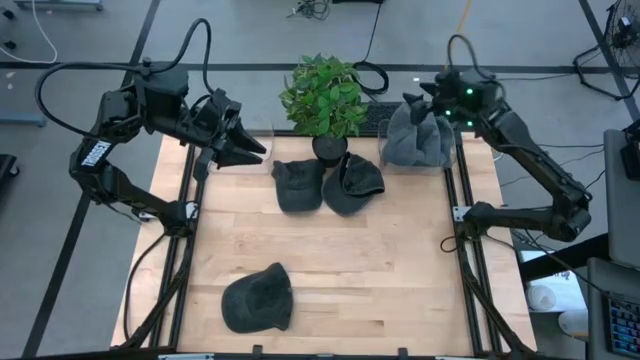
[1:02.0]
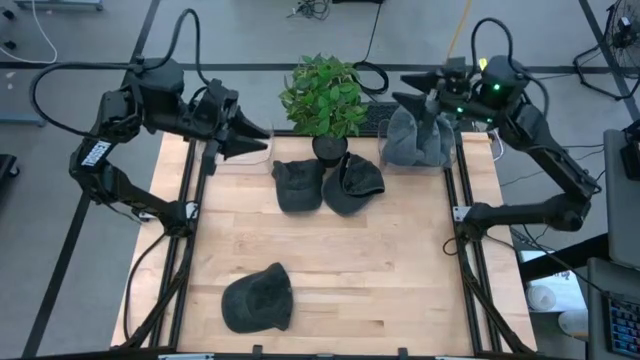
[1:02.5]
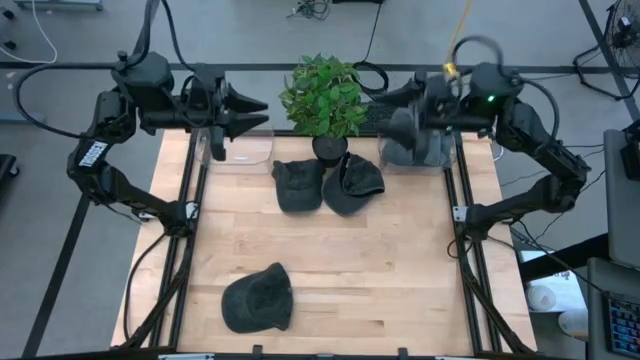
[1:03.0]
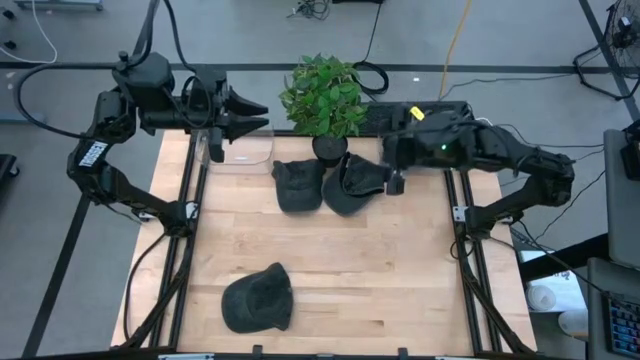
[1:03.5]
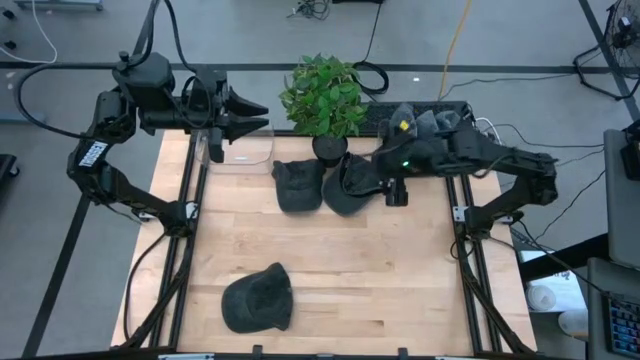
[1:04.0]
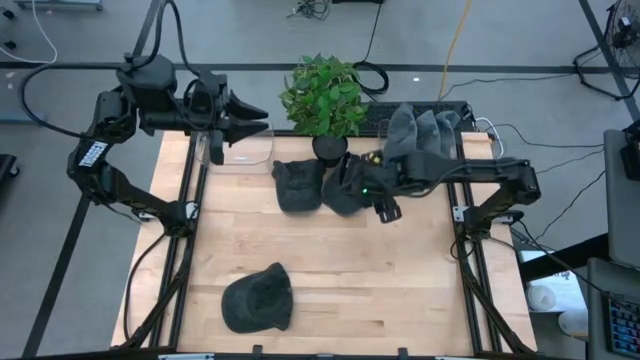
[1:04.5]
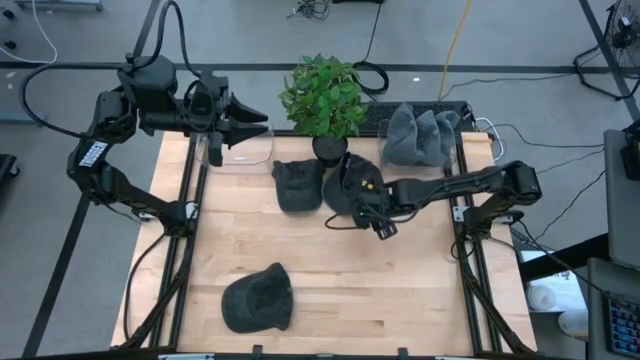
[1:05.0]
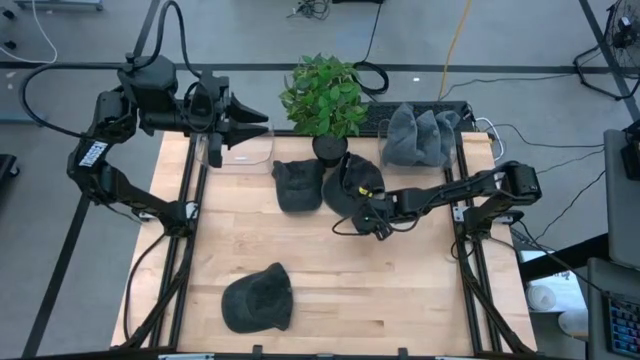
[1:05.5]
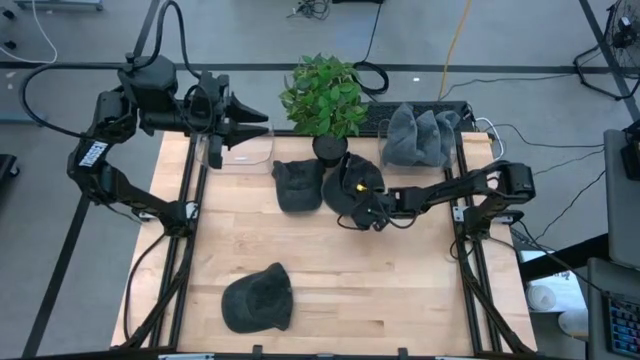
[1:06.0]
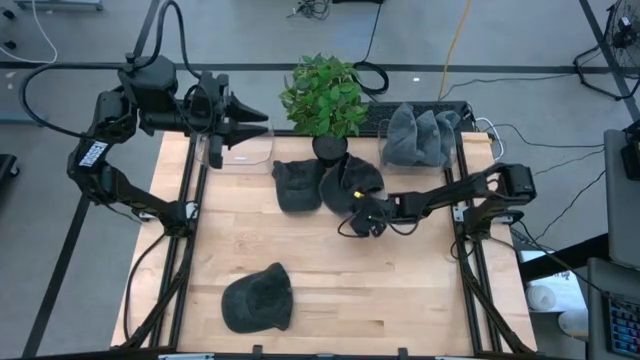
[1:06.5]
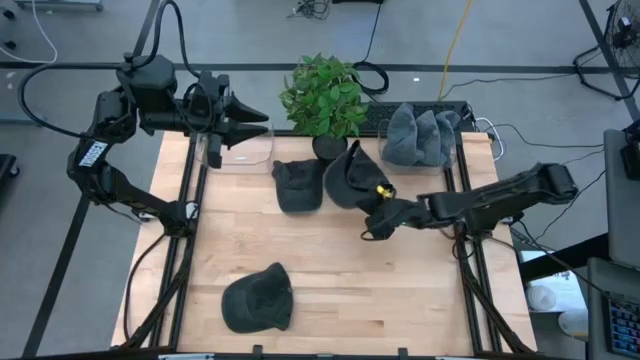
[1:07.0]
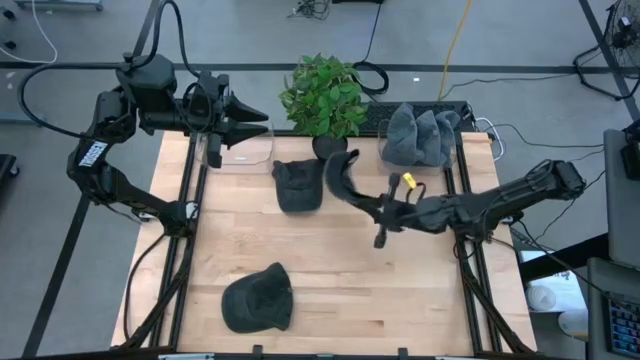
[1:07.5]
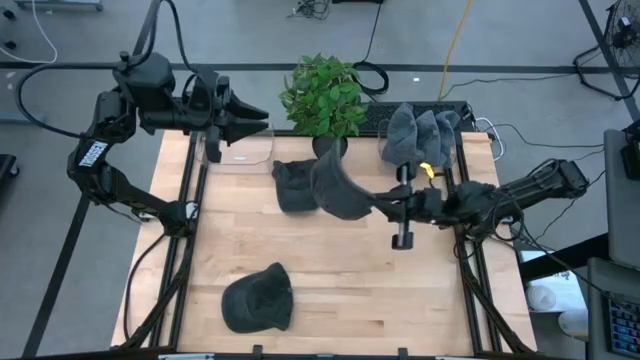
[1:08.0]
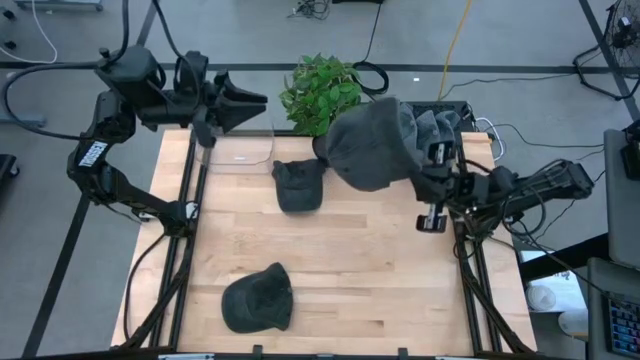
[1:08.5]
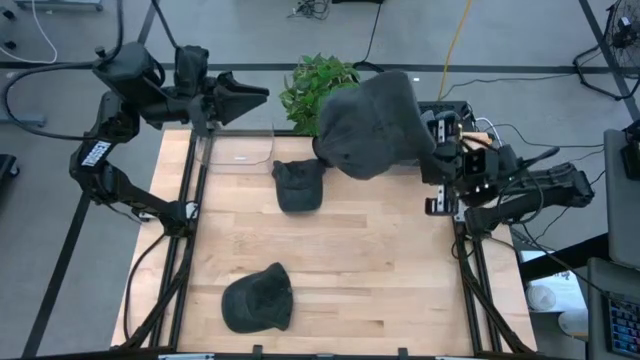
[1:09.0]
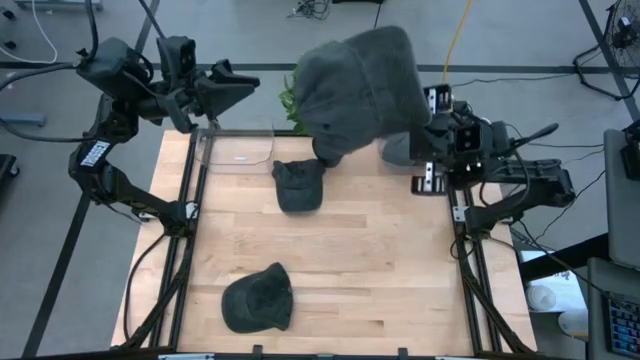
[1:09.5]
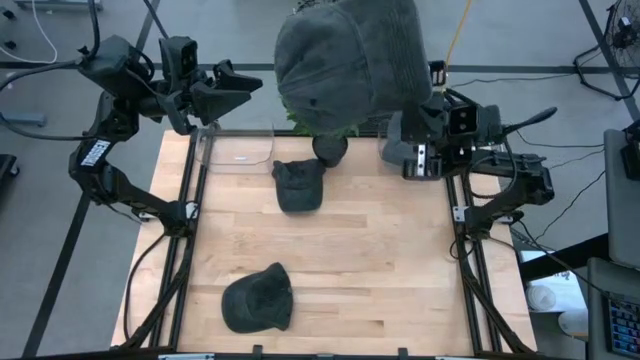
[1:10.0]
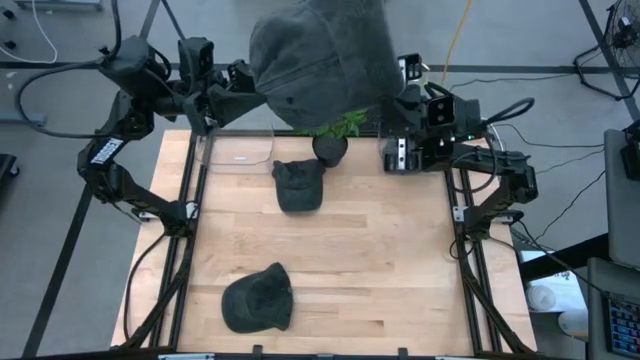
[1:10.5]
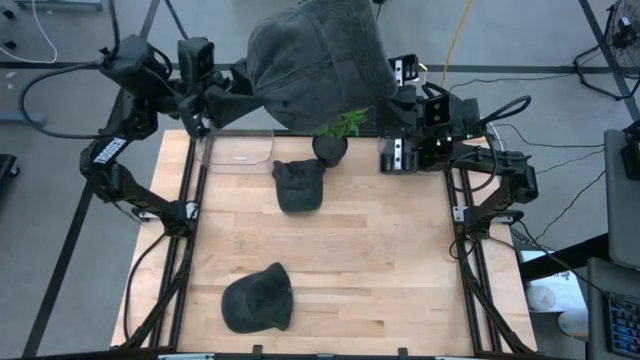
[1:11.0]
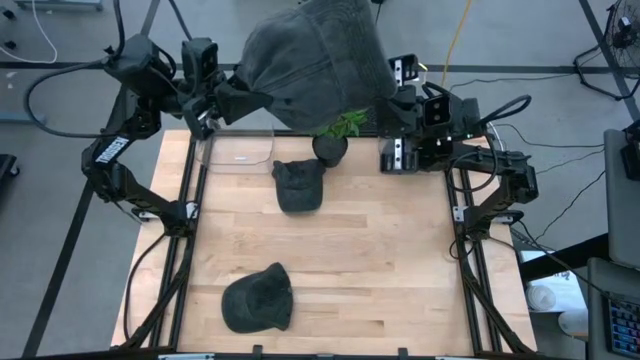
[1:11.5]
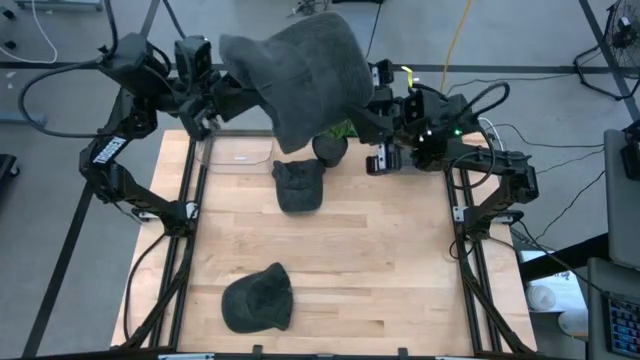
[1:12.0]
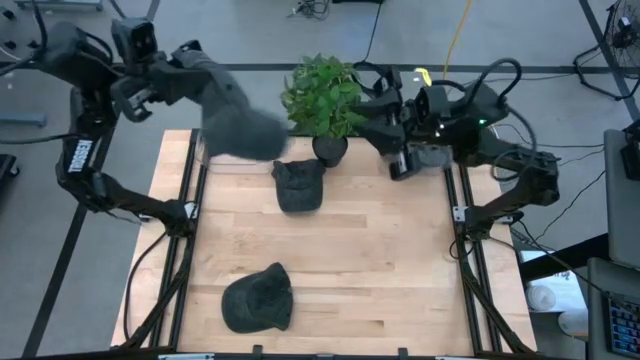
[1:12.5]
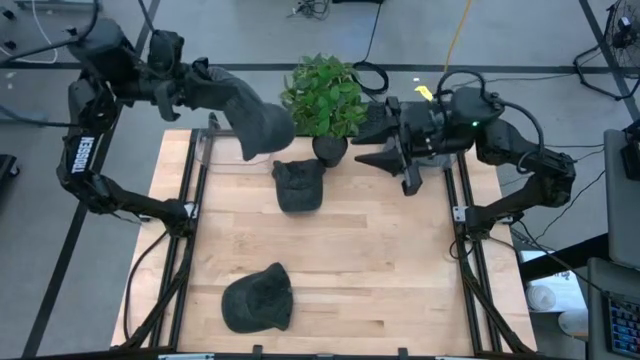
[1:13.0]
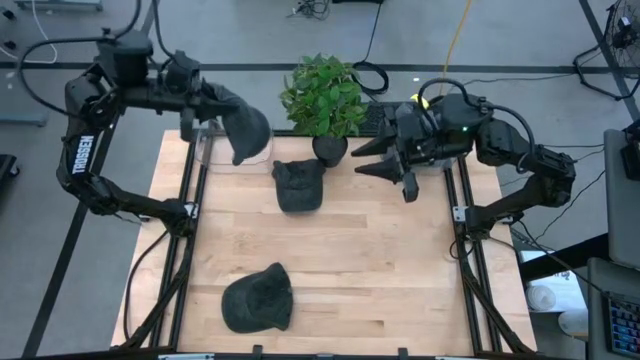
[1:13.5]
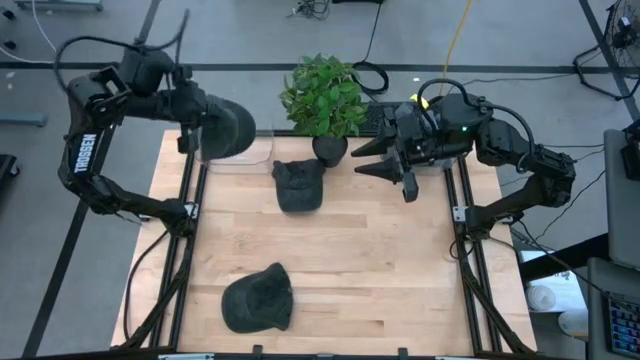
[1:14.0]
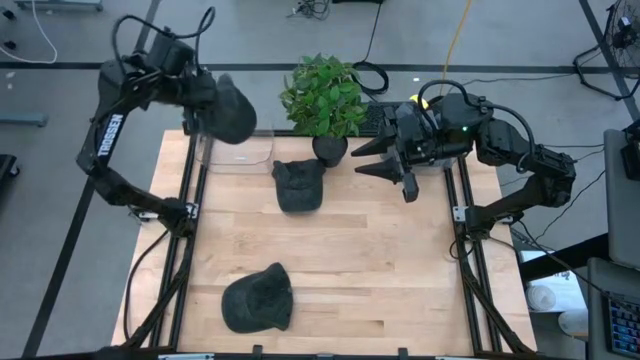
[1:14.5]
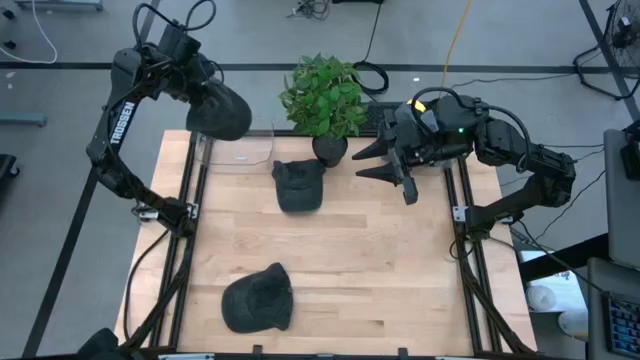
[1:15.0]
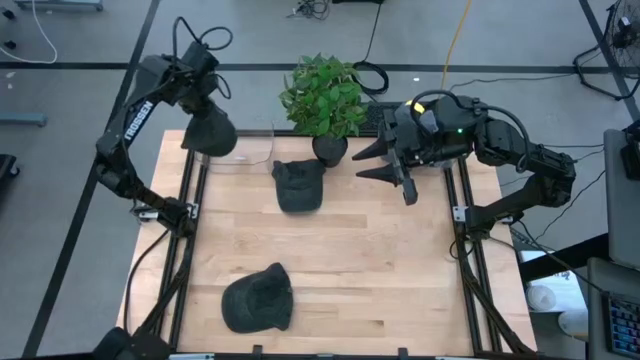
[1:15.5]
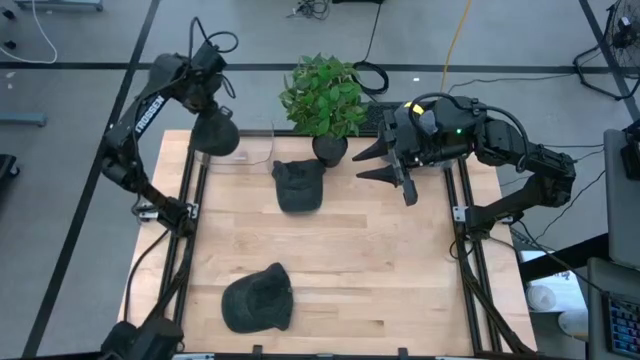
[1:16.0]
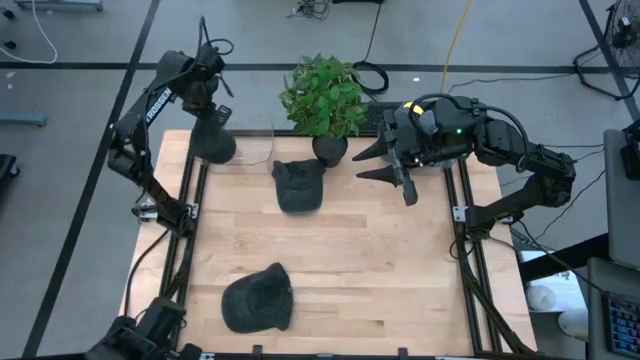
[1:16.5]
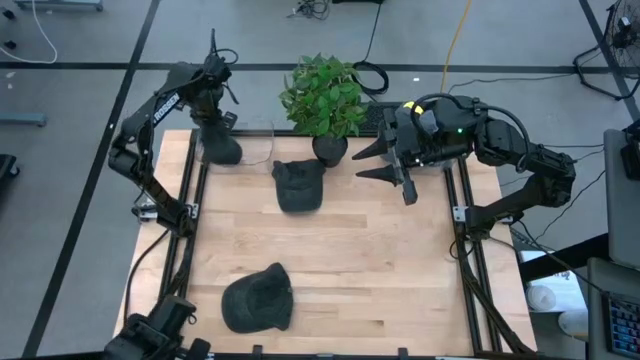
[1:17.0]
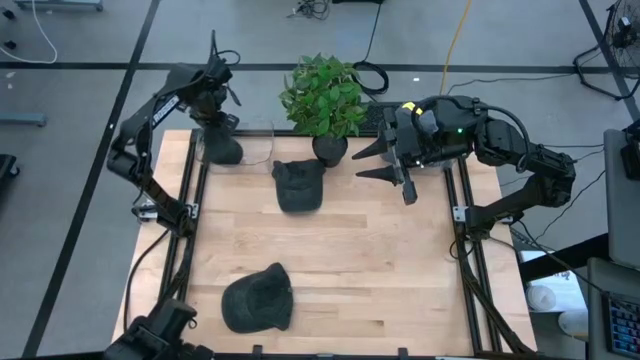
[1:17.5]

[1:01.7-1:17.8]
Task: Pick & Place hat
Put the top right black cap into the left transparent bin
